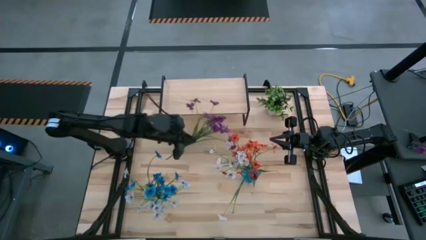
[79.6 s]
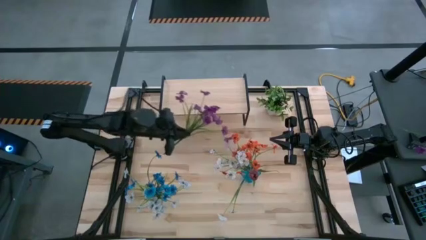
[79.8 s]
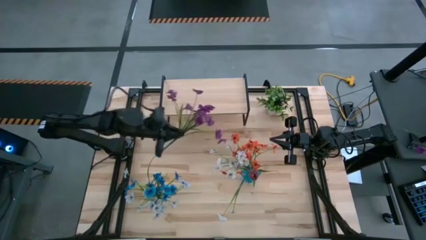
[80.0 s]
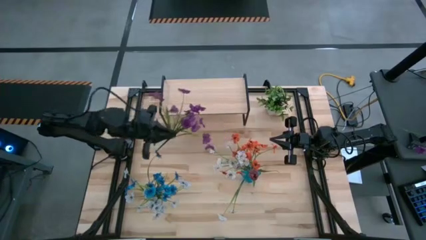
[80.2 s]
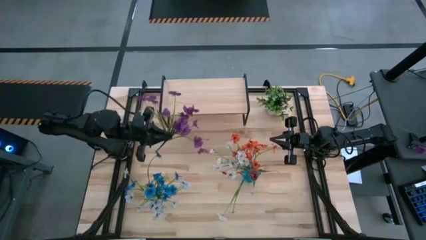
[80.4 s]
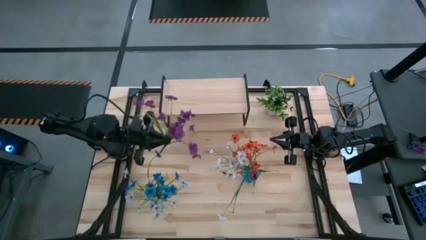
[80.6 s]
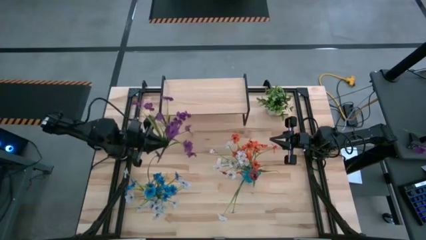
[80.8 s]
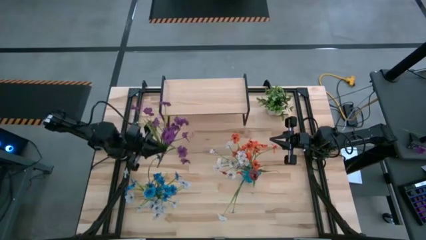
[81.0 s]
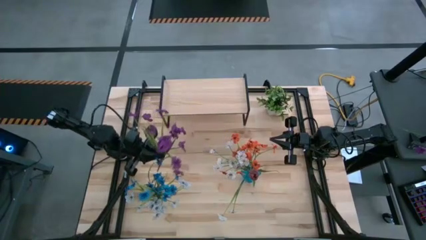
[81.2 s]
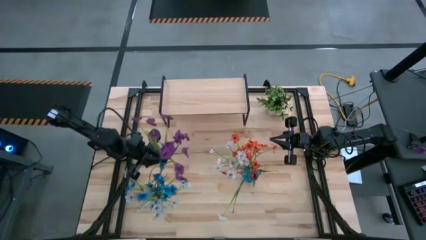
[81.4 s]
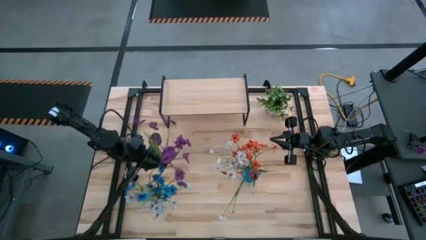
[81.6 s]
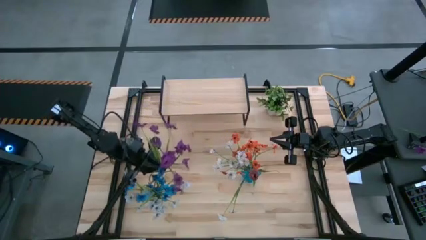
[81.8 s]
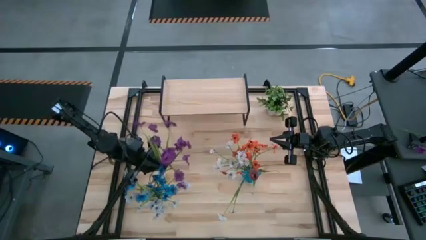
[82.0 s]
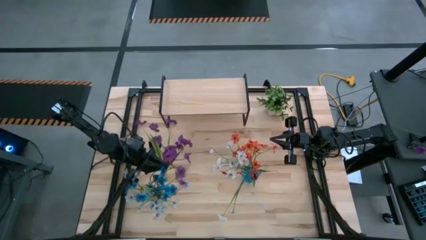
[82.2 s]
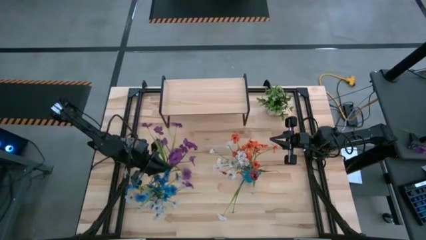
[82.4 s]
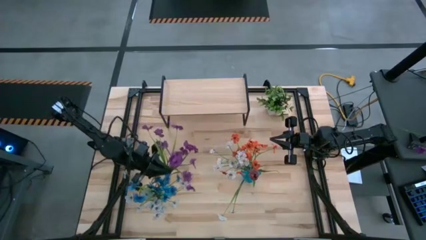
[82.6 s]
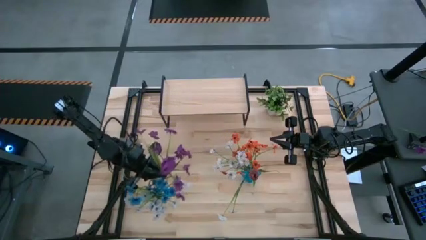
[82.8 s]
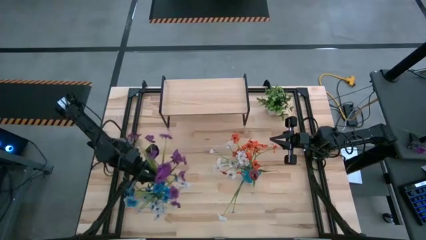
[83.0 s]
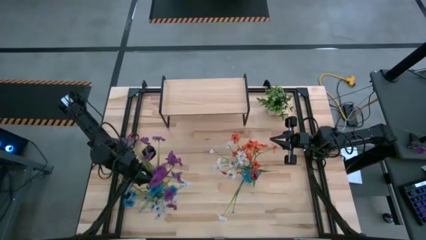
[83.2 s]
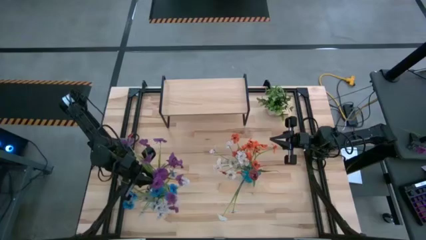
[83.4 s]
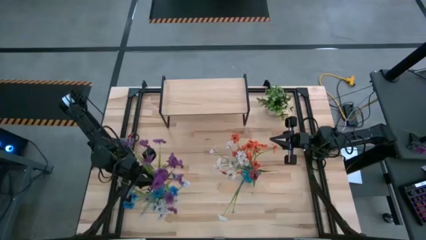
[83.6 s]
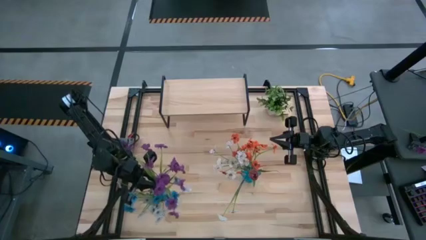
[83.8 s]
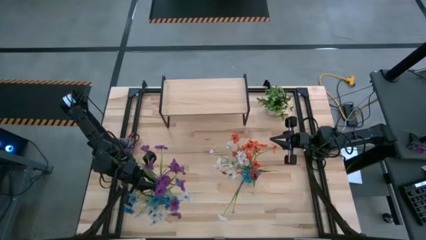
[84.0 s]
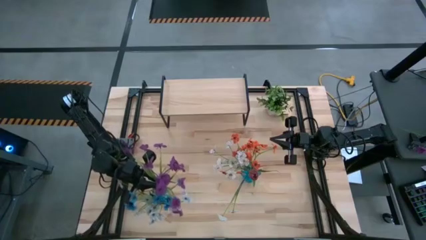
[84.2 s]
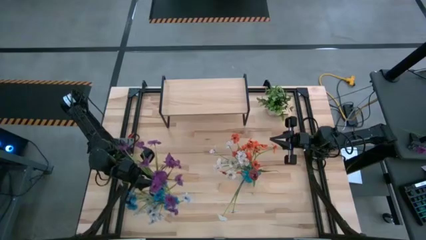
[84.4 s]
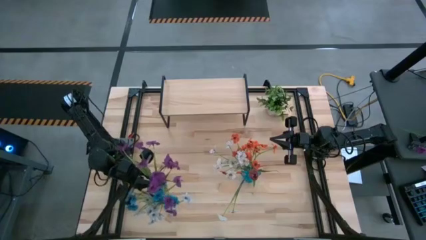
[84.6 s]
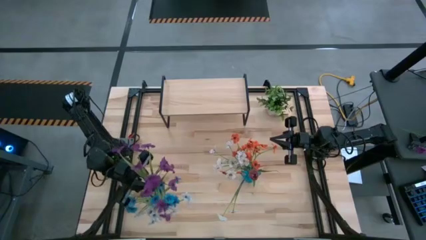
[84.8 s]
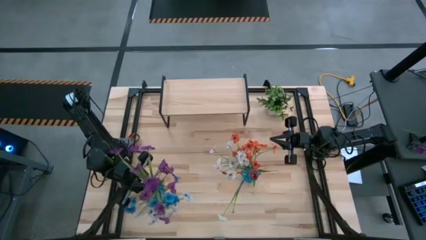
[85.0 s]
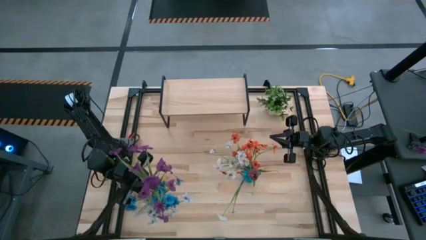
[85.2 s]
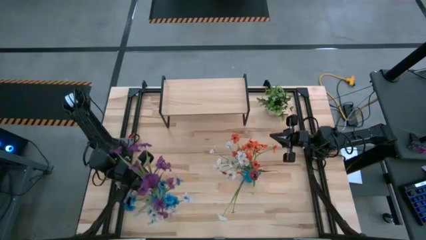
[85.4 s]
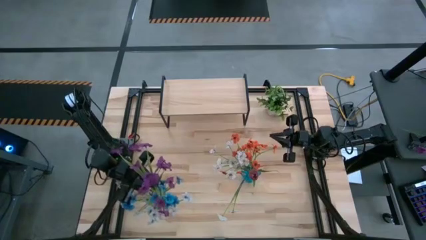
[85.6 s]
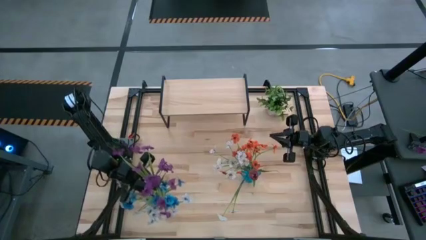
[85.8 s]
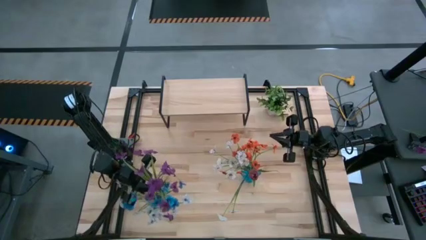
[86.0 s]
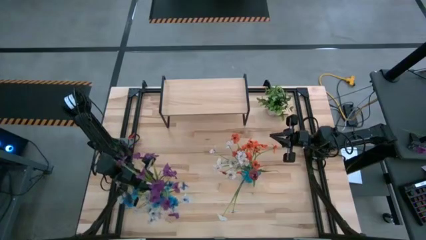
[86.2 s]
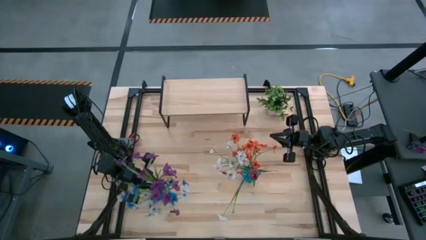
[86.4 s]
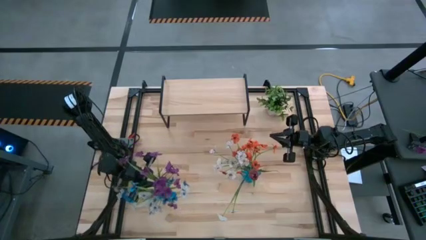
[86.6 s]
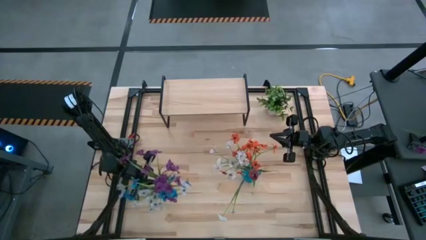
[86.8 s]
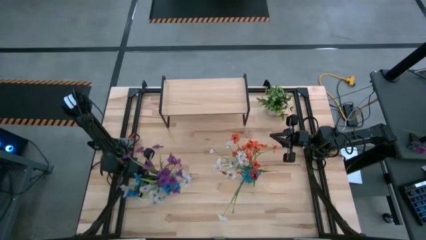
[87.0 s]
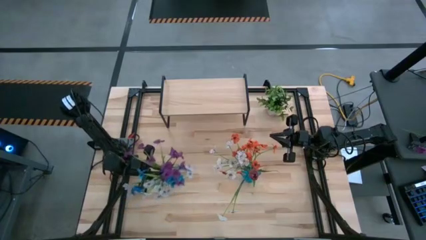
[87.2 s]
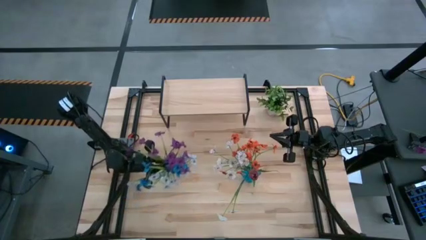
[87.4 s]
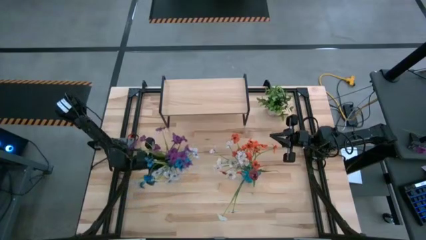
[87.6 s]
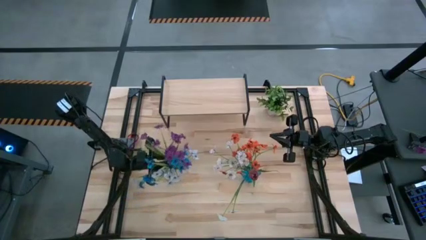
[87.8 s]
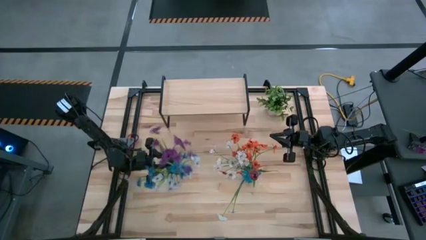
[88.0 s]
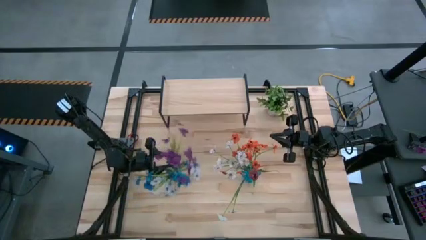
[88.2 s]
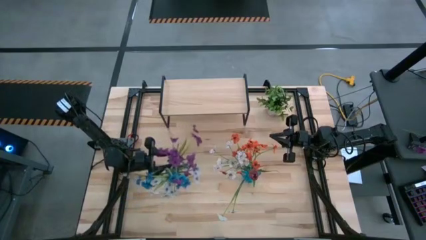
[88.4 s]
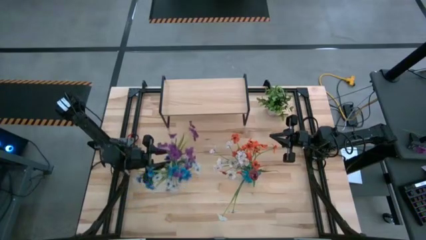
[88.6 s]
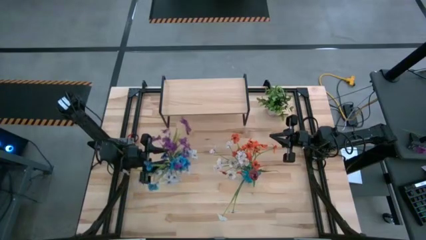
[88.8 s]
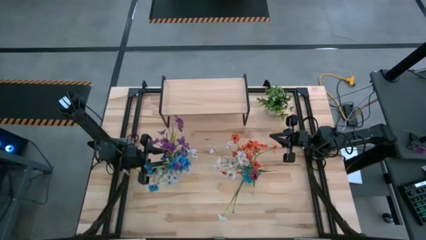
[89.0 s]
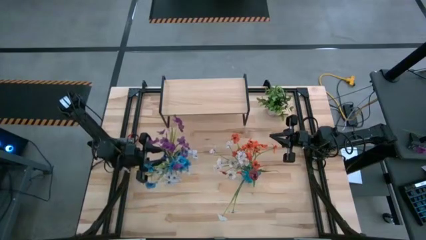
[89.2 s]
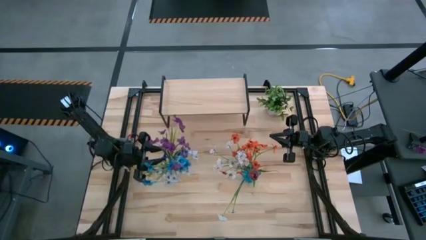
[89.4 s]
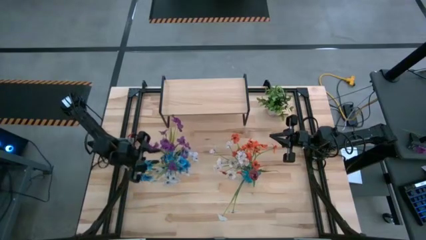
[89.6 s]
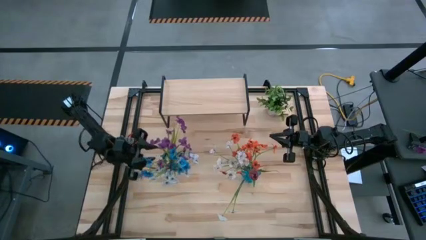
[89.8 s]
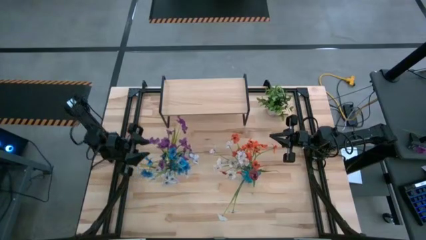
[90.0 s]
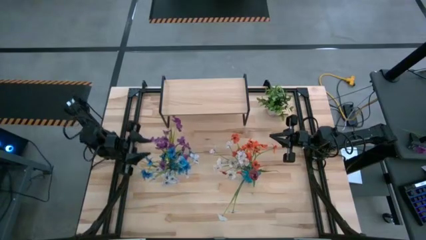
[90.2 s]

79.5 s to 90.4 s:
Task: Pick and place flowers into a vace then onto a shelf
Put the violet flowers into the transparent vase

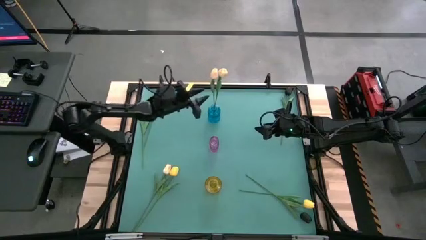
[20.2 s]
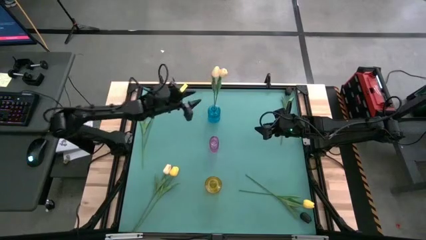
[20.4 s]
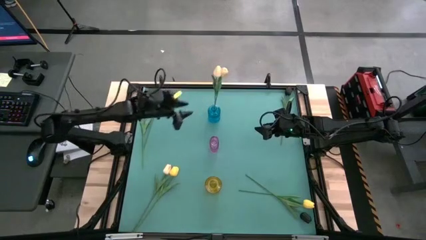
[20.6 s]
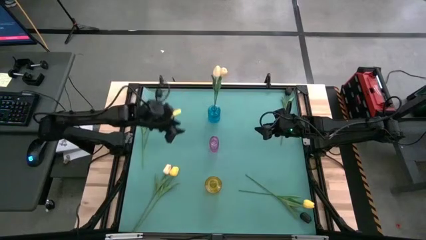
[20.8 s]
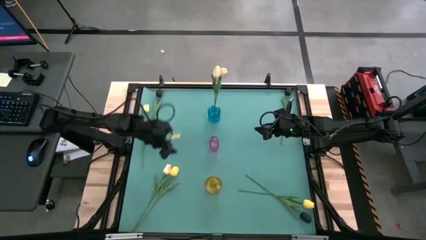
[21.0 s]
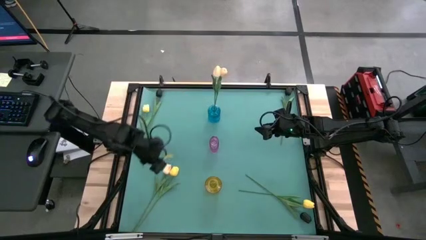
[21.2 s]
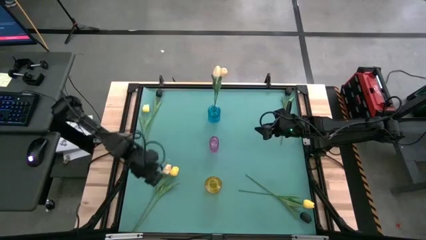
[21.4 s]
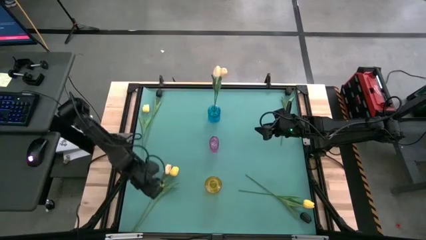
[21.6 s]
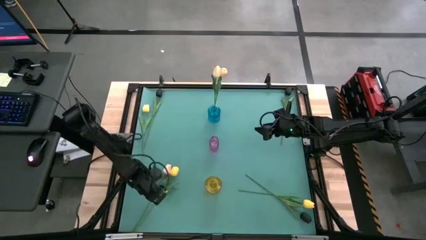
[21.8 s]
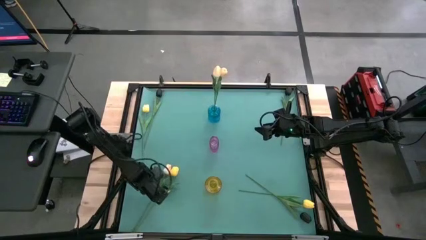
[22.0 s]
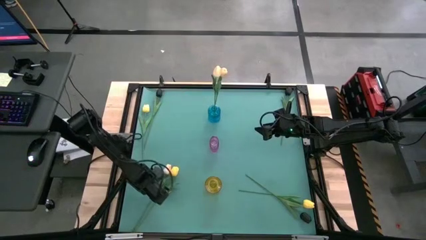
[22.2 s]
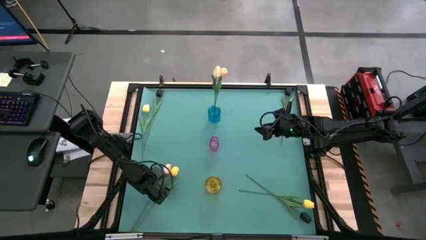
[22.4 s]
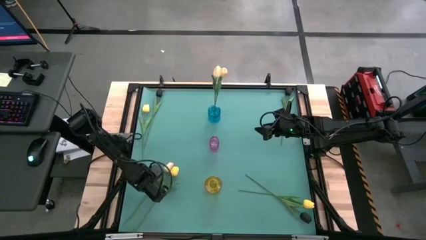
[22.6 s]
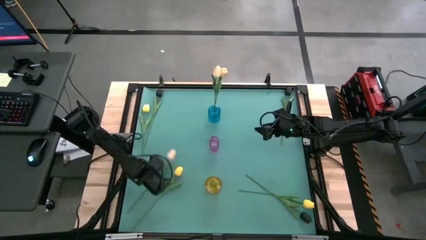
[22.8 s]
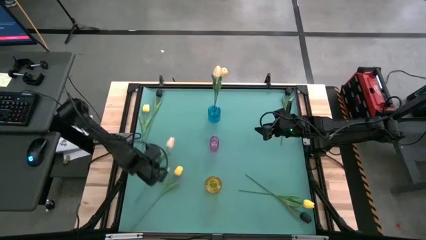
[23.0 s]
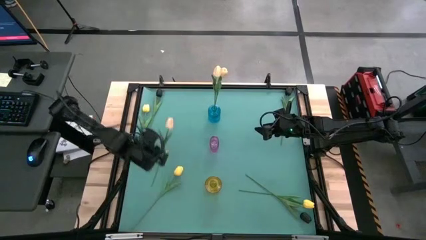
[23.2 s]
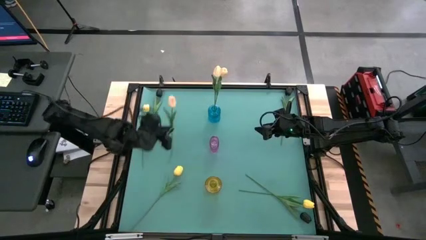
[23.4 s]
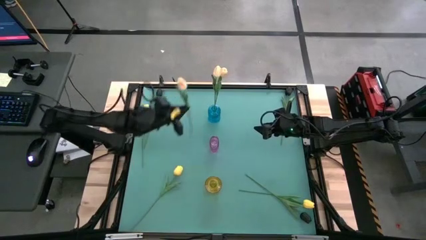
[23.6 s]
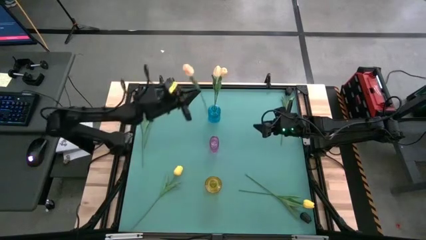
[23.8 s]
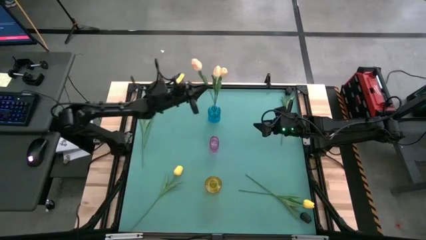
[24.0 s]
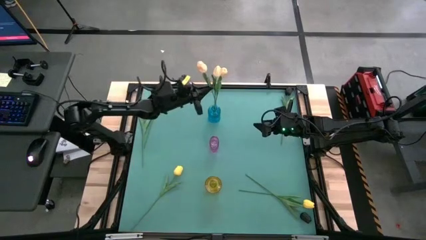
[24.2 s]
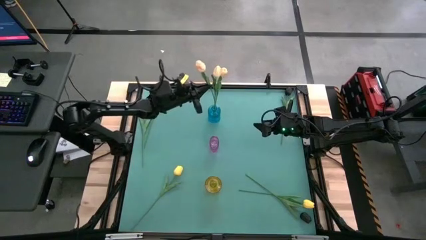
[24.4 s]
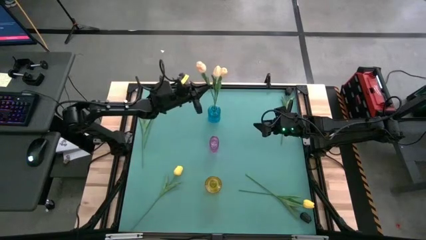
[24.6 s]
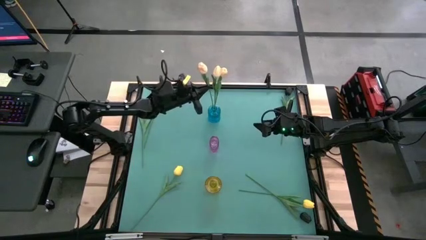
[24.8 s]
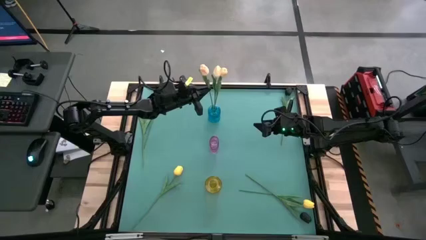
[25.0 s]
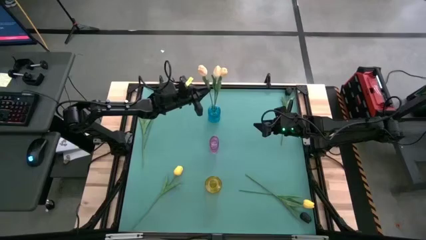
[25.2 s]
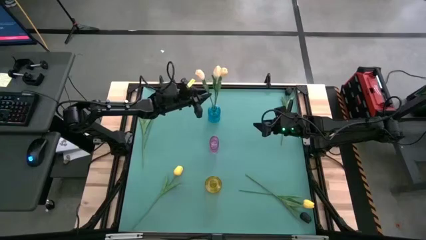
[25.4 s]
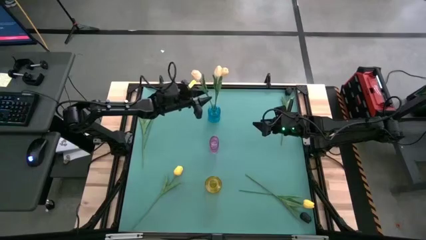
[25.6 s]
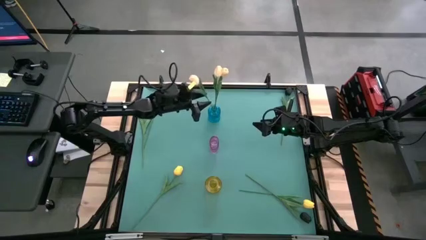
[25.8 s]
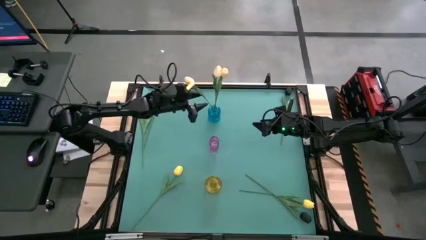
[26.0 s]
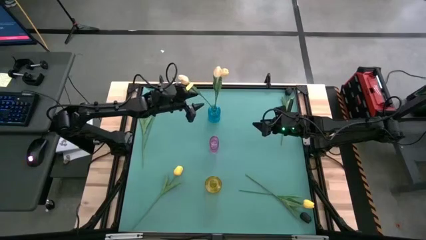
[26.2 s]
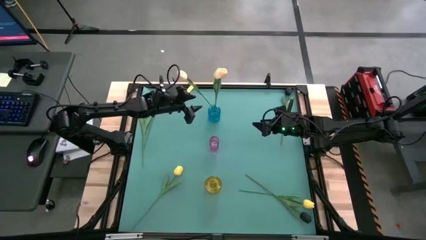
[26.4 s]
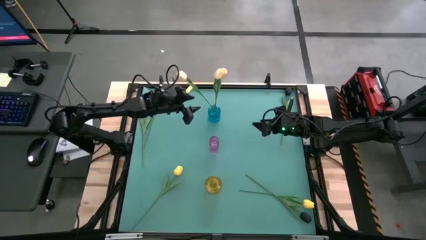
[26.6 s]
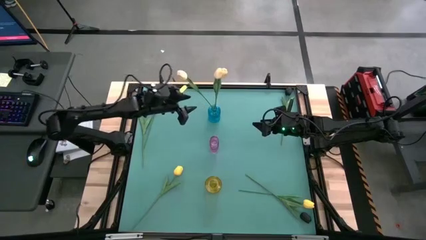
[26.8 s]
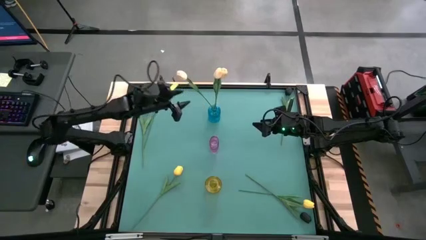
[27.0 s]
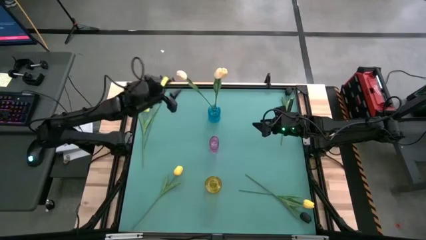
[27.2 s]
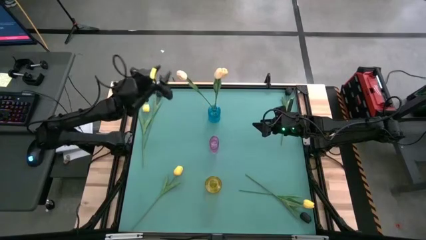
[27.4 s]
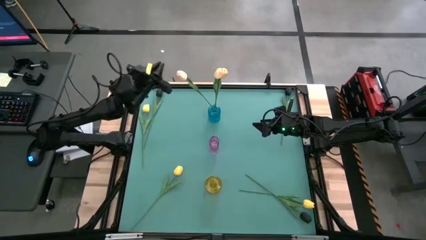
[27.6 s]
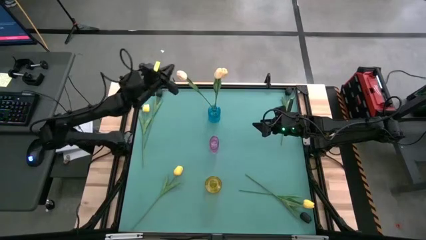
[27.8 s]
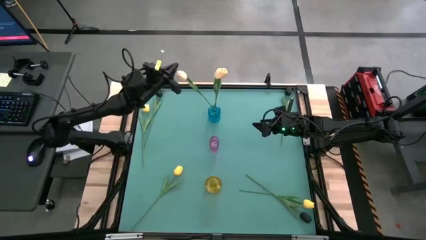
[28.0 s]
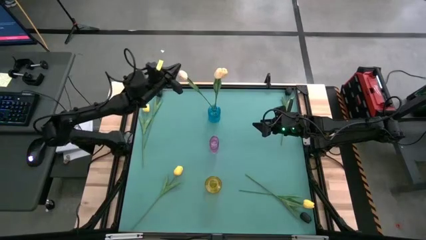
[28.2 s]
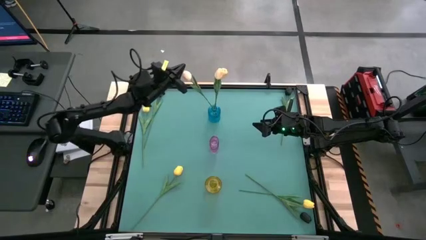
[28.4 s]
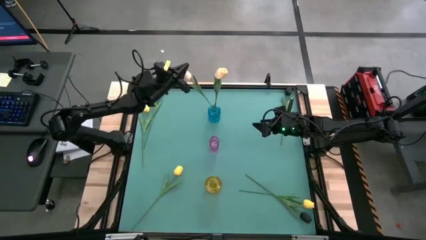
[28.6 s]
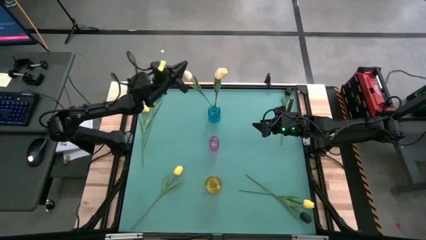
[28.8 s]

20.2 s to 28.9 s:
Task: Sort flowers into vase by color
Put the white flower into the blue vase
